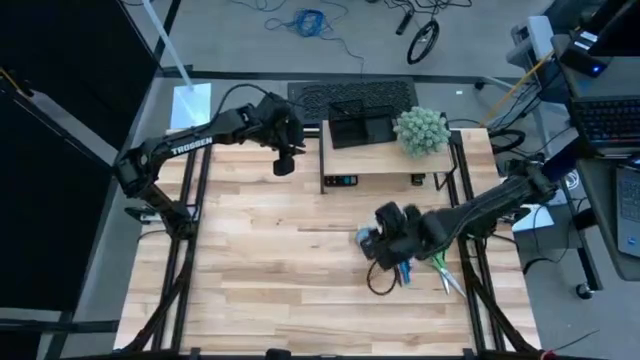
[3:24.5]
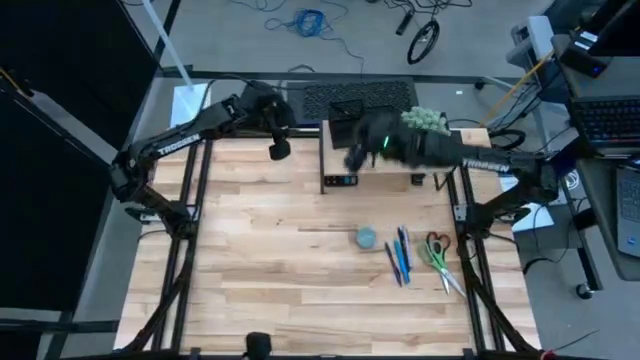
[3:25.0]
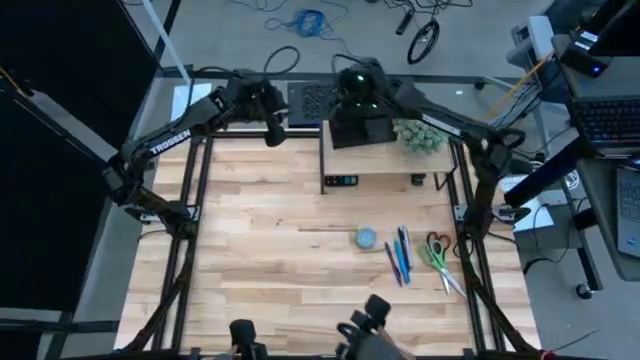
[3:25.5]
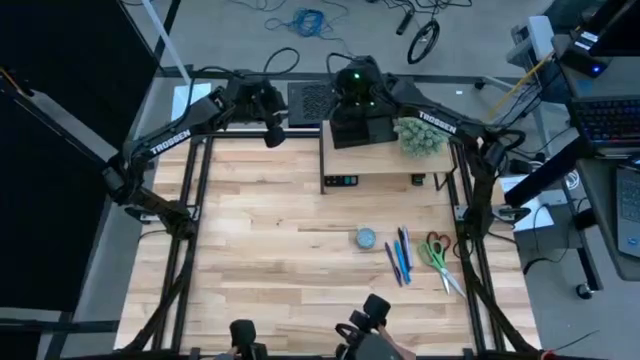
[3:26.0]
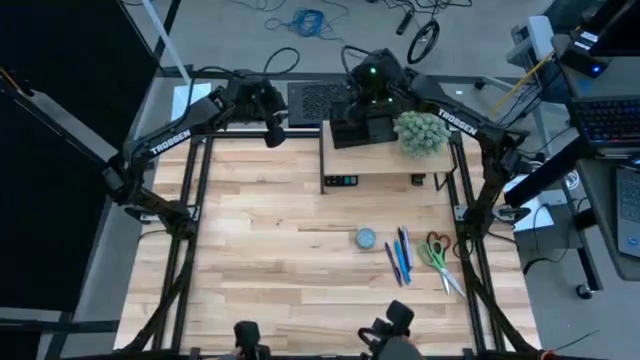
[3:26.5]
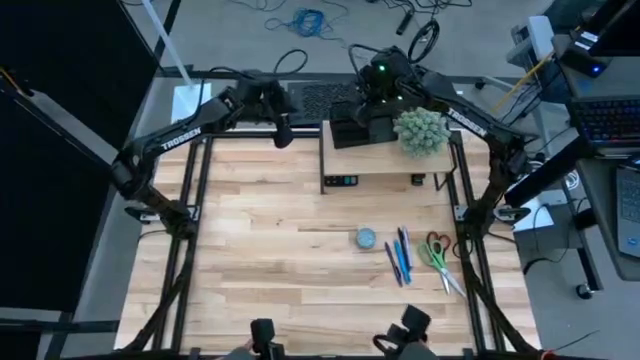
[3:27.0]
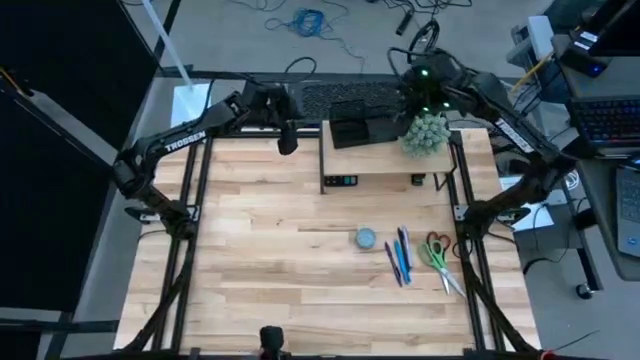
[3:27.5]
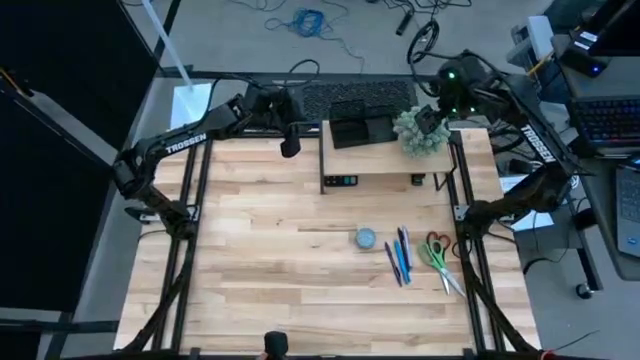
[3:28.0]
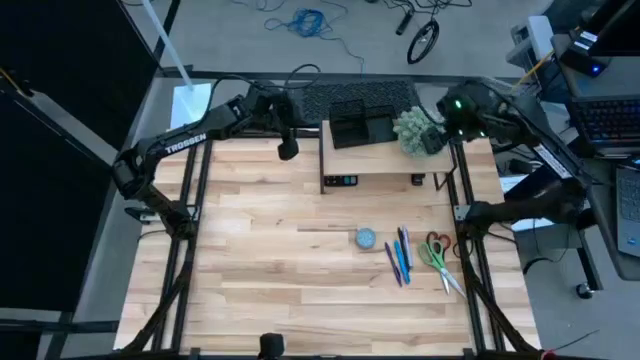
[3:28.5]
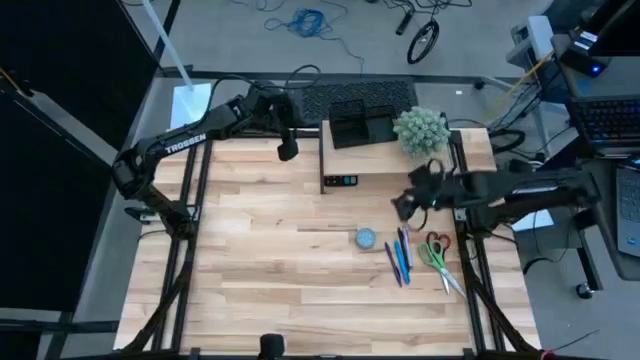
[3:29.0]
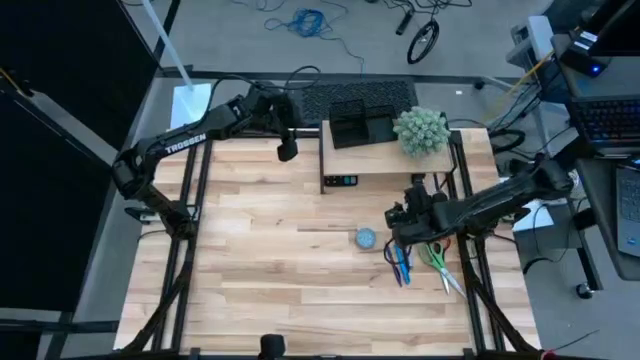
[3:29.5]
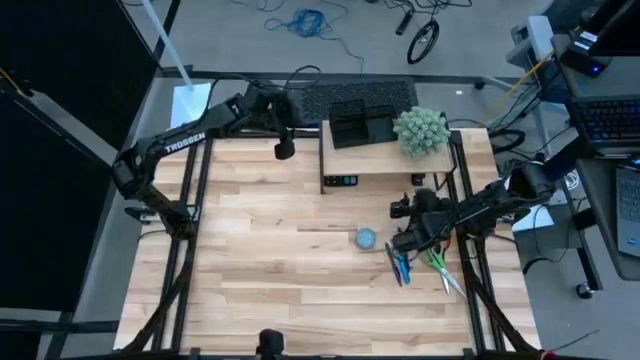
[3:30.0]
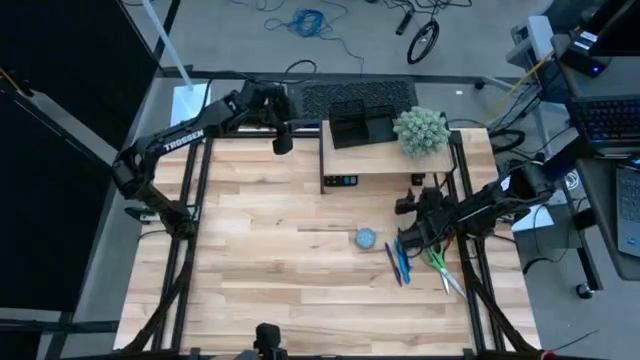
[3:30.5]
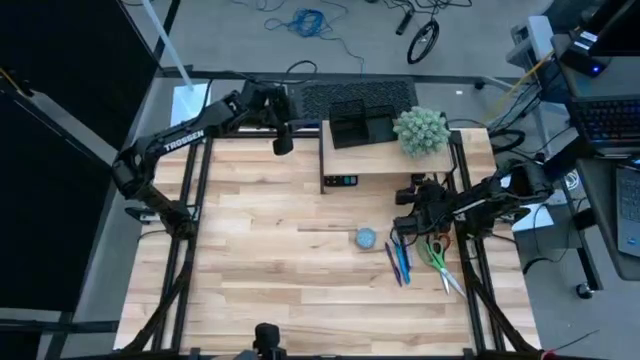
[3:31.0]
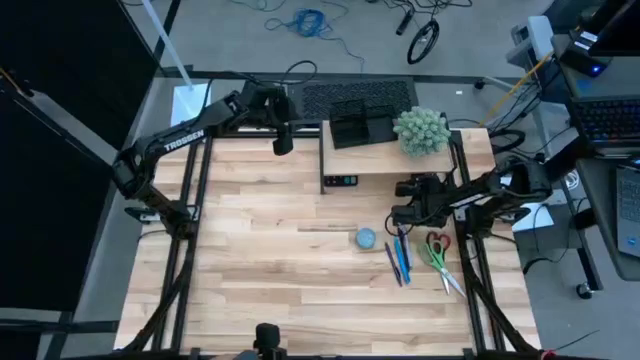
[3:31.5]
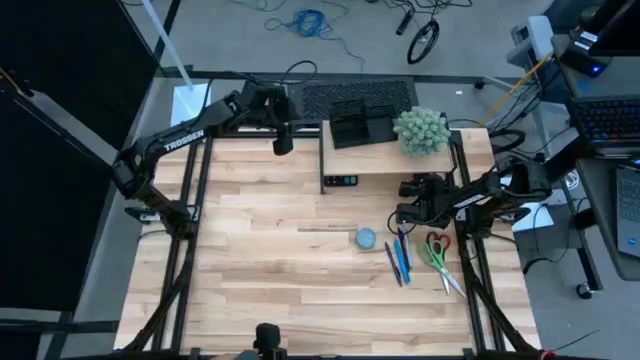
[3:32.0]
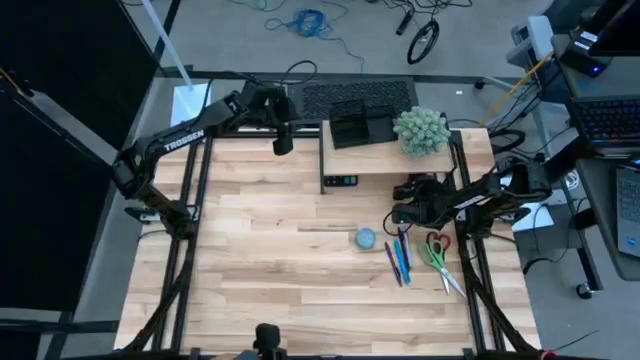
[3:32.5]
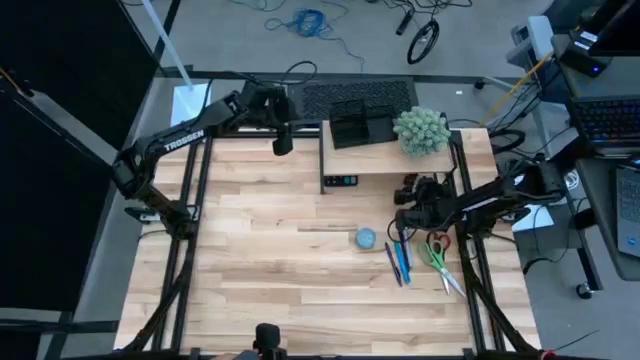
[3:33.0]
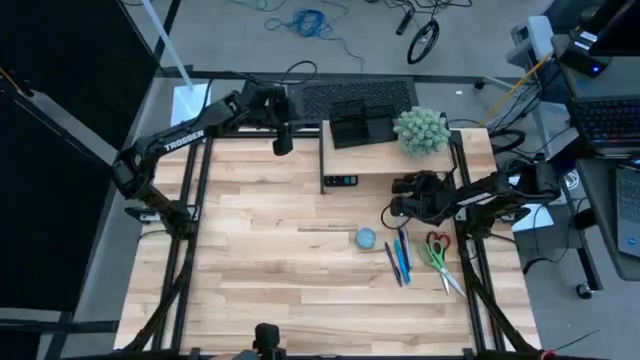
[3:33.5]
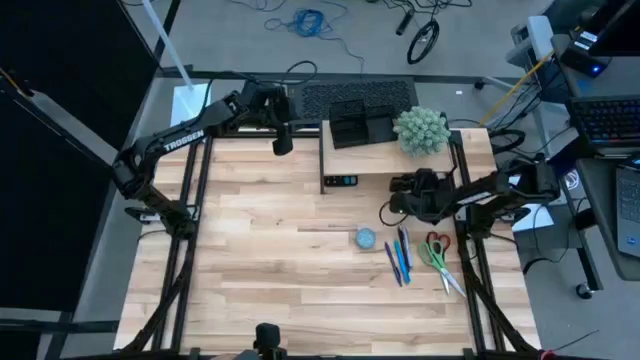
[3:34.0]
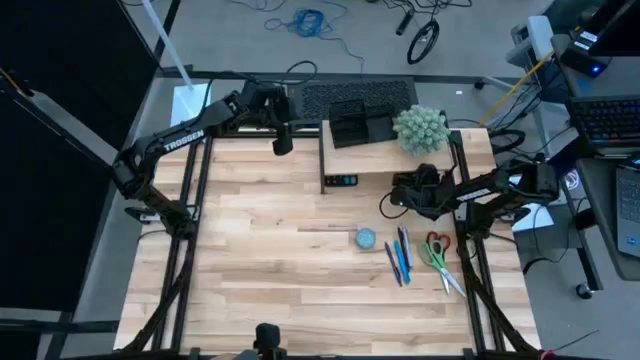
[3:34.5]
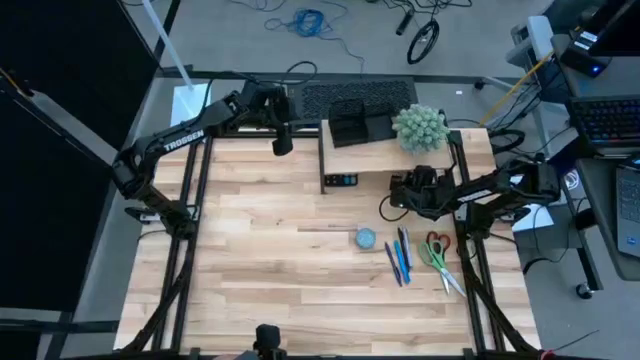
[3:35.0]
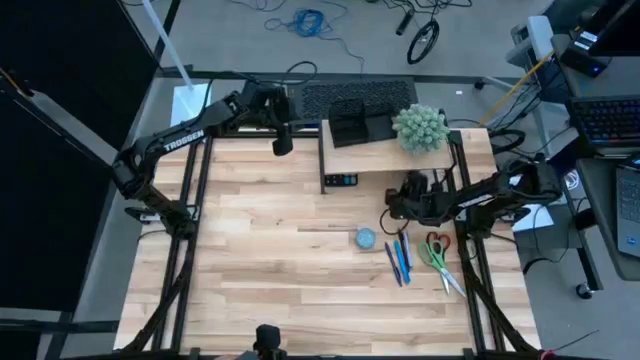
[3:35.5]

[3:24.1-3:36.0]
Task: Pick and place office supplies into organizer
Remove the black stapler from under the wooden shelf

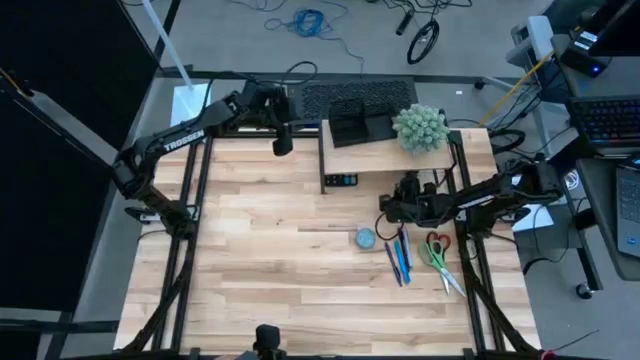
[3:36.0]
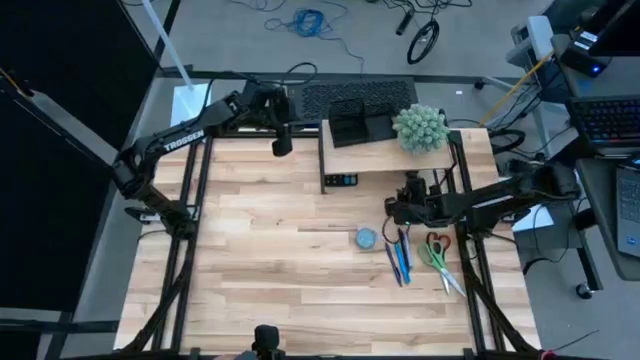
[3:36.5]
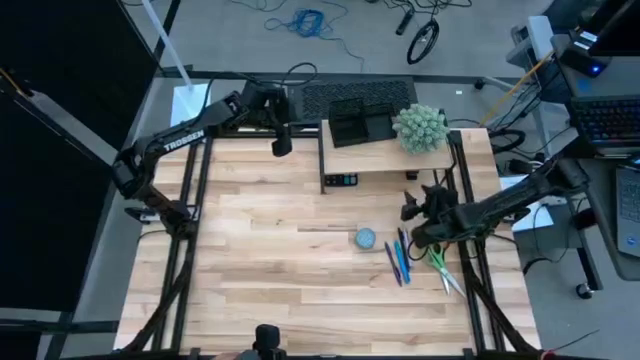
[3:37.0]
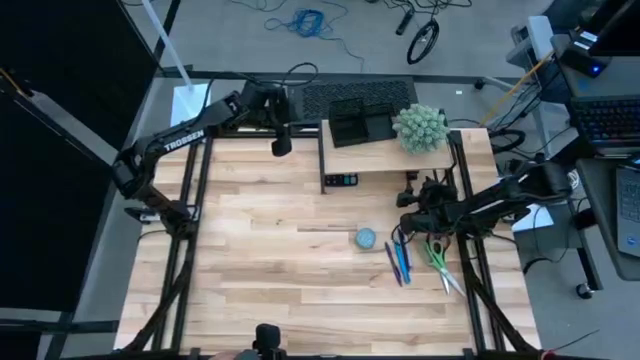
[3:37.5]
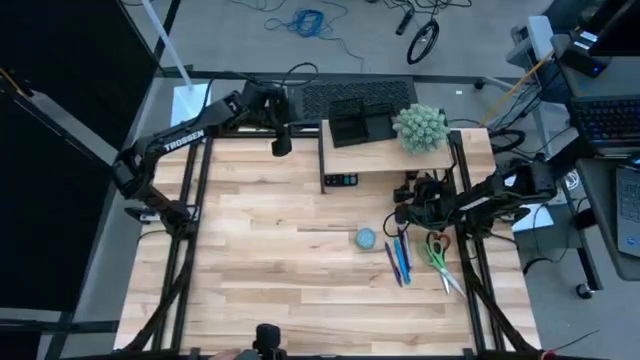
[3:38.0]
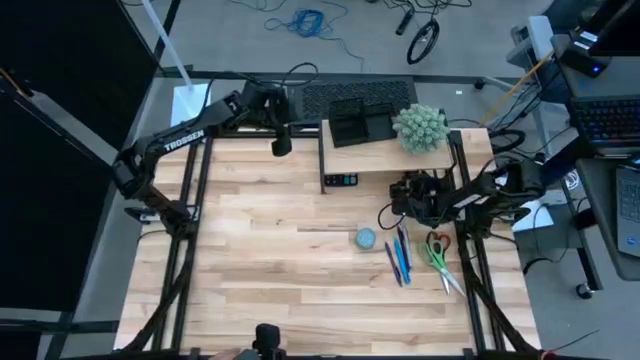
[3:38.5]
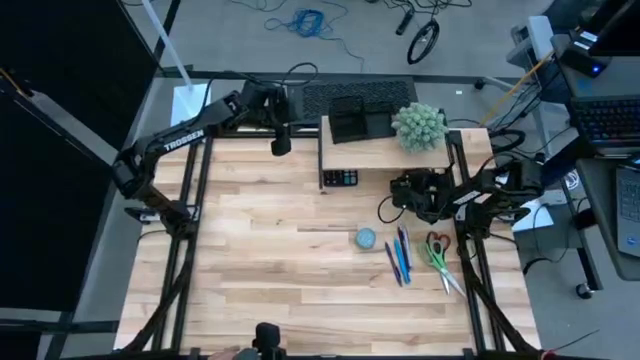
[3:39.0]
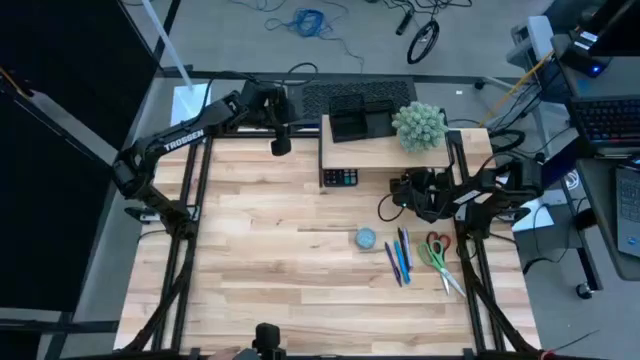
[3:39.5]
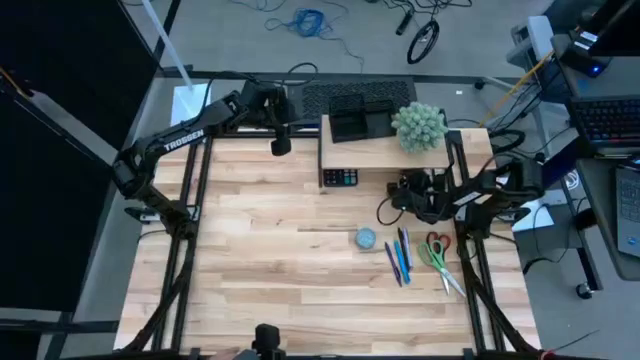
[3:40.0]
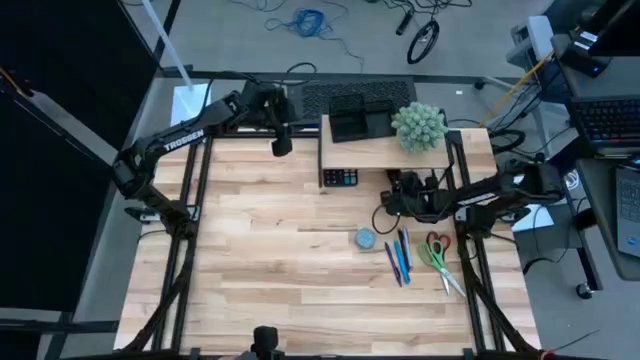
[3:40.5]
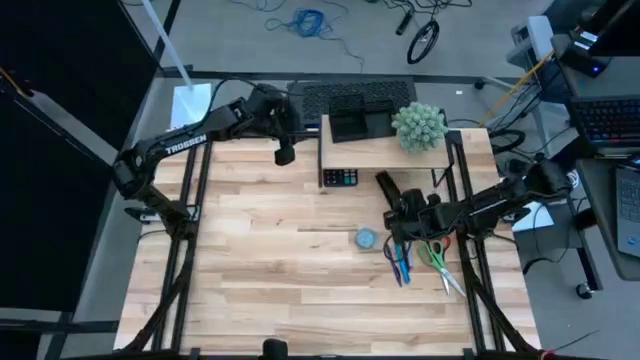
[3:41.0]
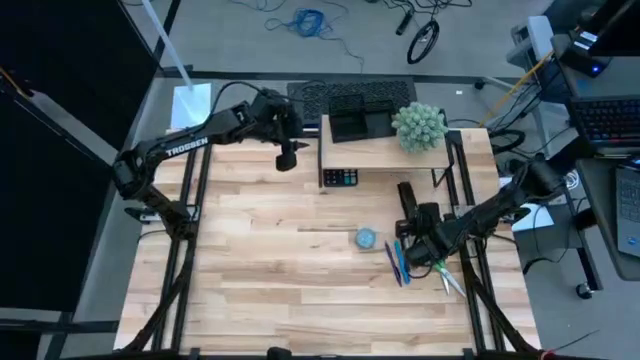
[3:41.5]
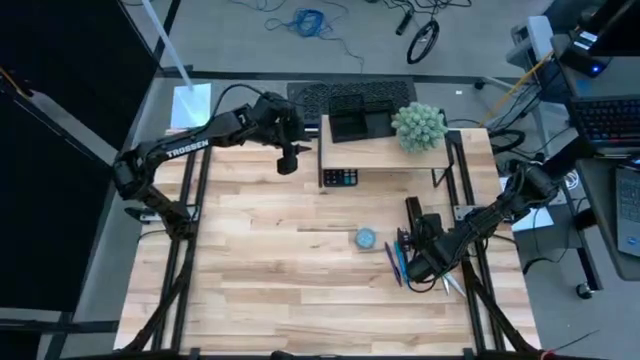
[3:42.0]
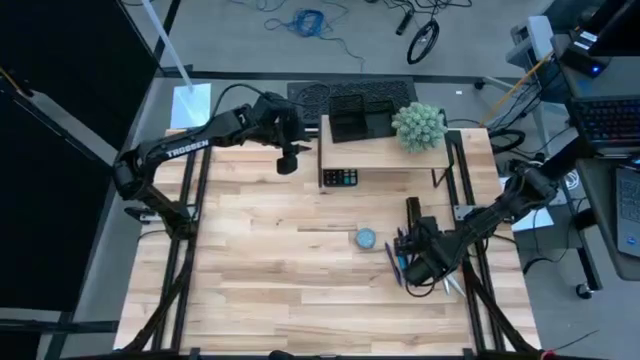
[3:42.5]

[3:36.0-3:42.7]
Remove the black stapler from under the wooden shelf

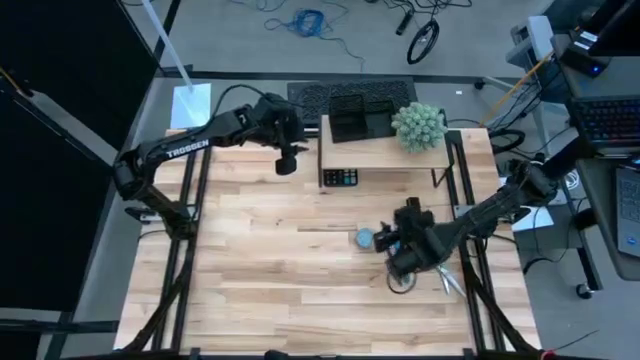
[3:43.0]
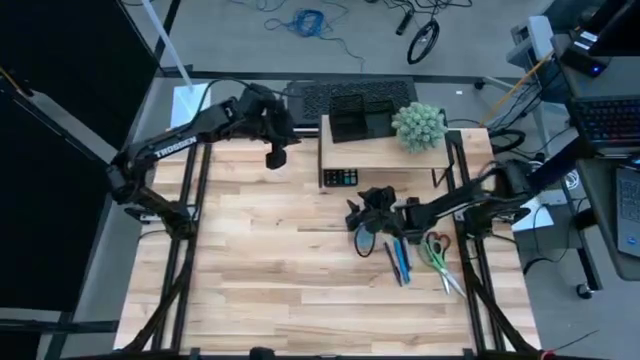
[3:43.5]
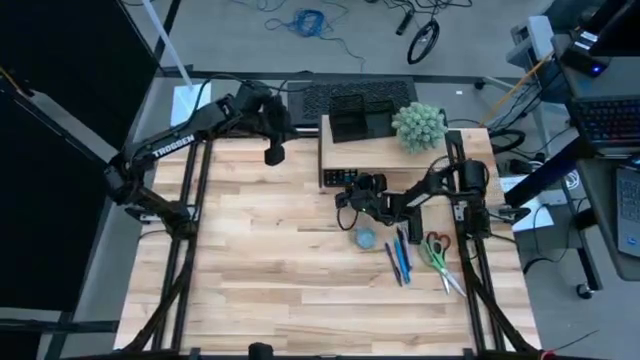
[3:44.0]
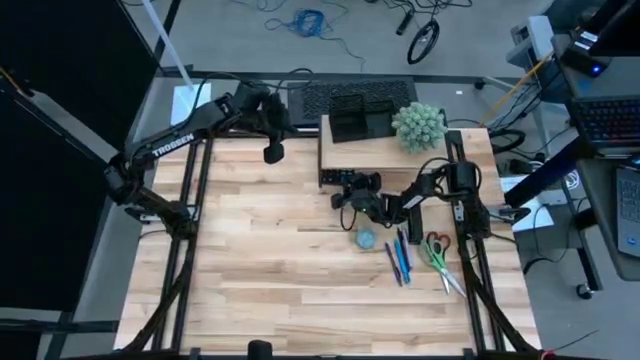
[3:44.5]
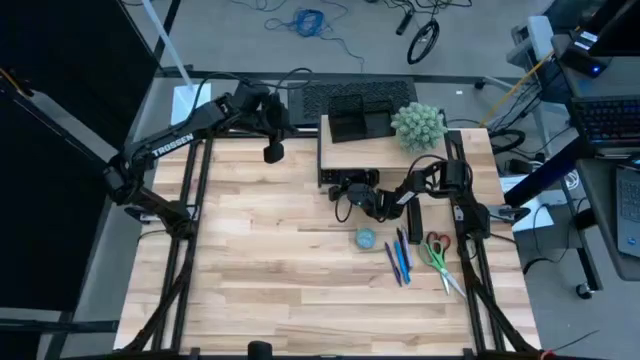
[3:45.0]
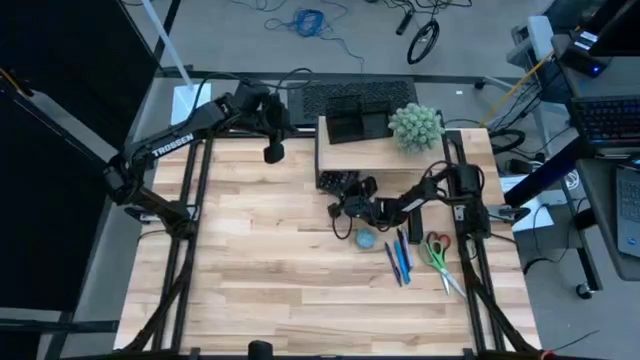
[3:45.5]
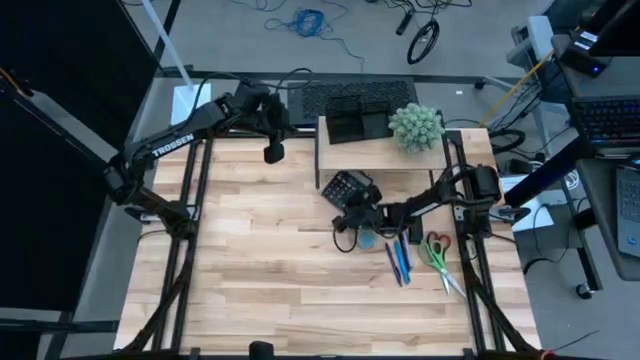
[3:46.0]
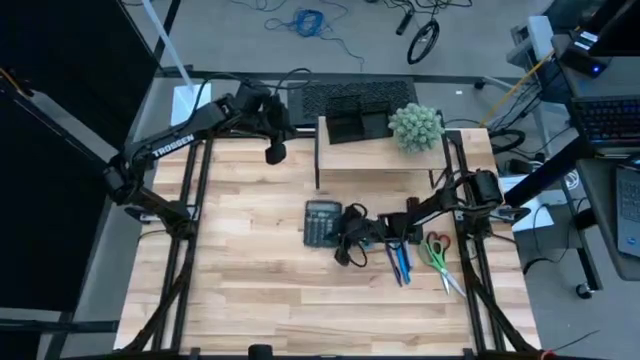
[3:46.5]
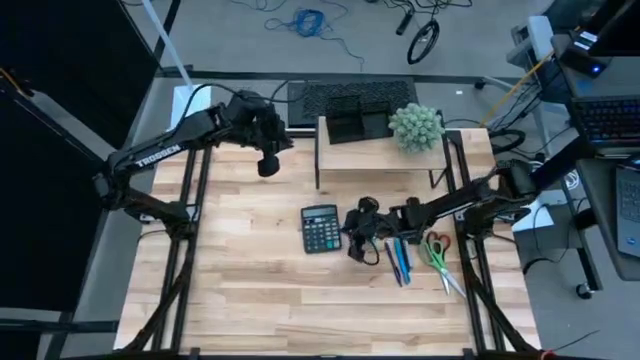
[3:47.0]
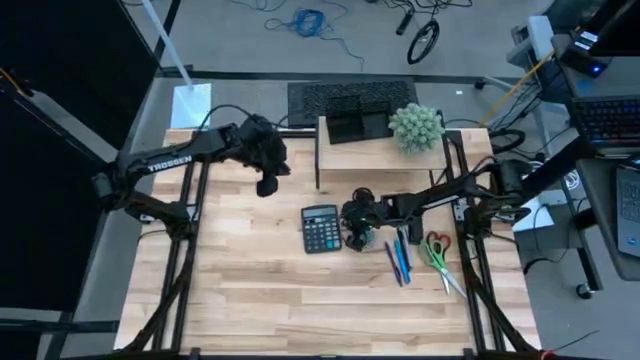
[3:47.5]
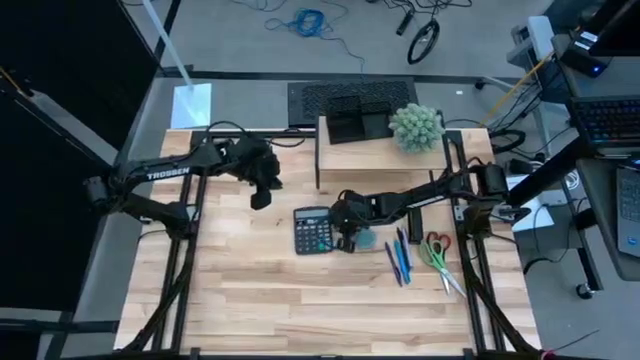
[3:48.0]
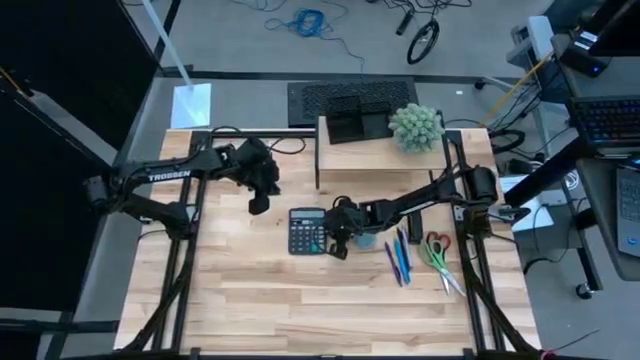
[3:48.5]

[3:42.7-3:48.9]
Remove the black calculator from under the wooden shelf
